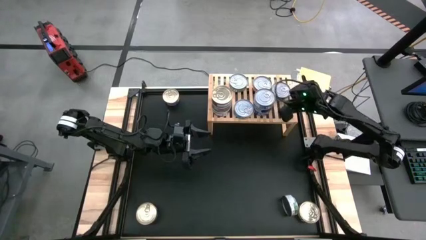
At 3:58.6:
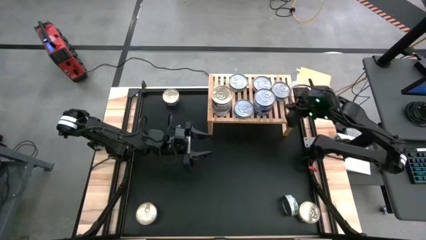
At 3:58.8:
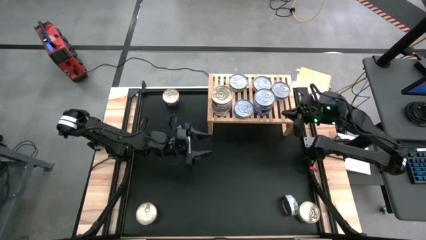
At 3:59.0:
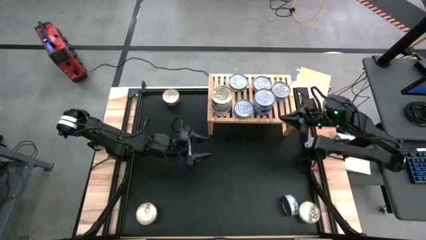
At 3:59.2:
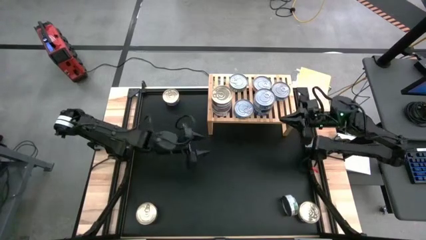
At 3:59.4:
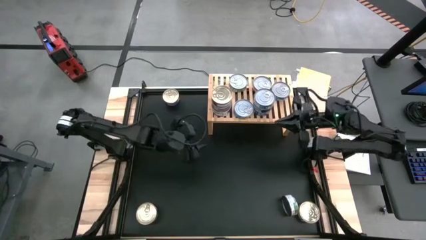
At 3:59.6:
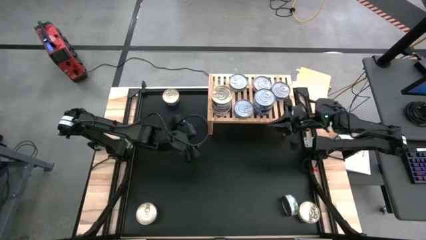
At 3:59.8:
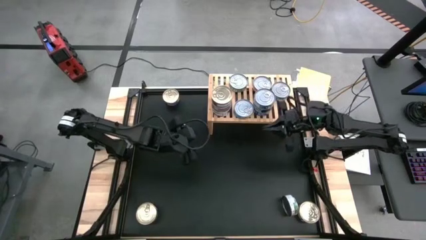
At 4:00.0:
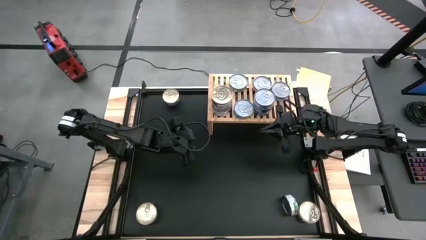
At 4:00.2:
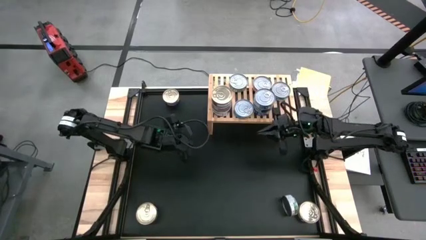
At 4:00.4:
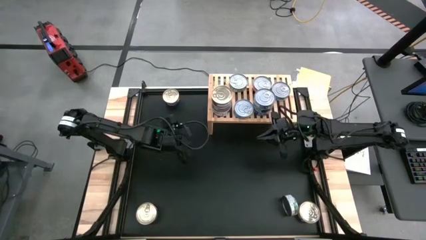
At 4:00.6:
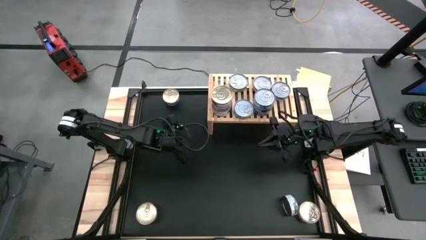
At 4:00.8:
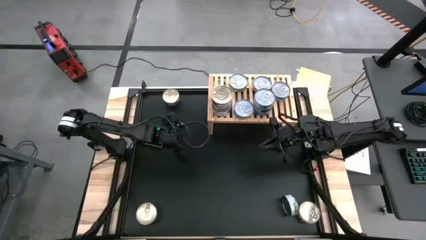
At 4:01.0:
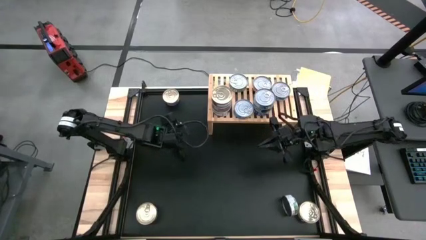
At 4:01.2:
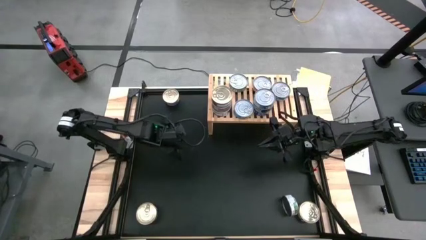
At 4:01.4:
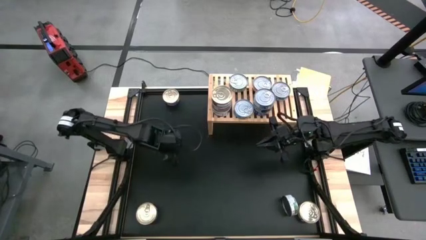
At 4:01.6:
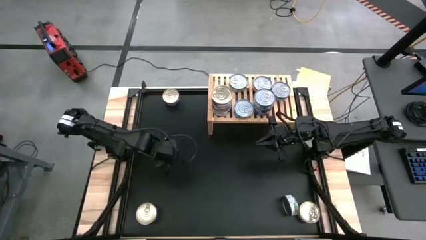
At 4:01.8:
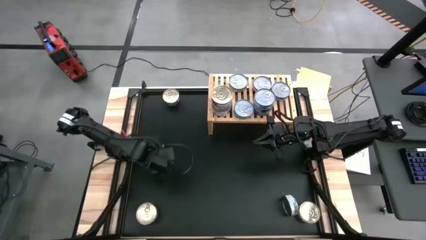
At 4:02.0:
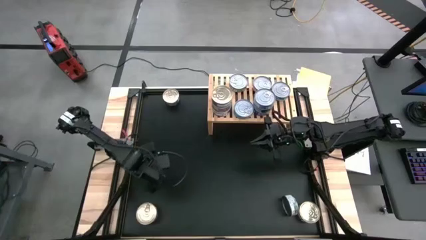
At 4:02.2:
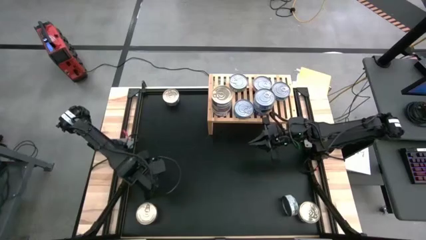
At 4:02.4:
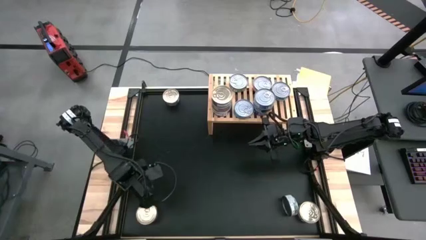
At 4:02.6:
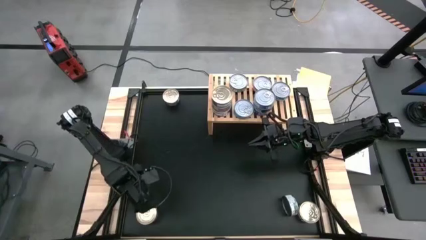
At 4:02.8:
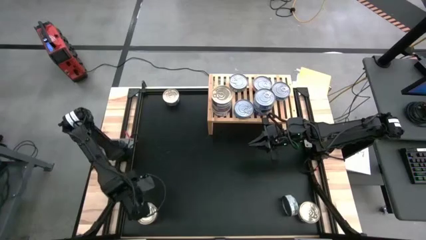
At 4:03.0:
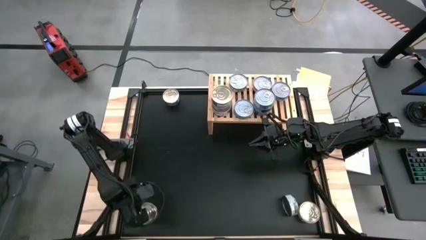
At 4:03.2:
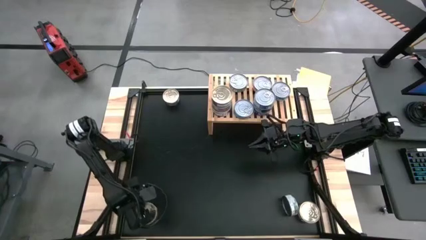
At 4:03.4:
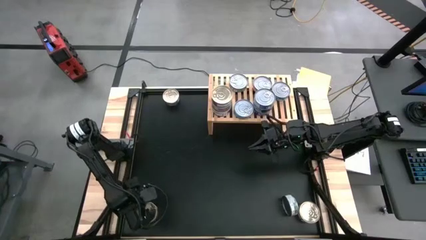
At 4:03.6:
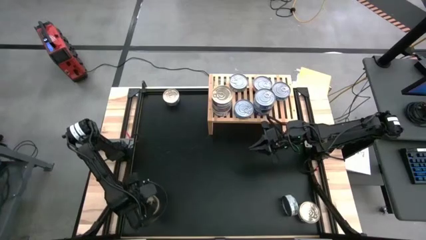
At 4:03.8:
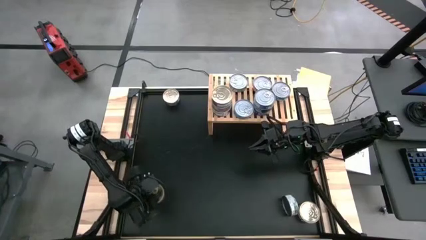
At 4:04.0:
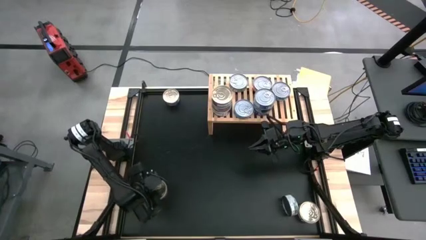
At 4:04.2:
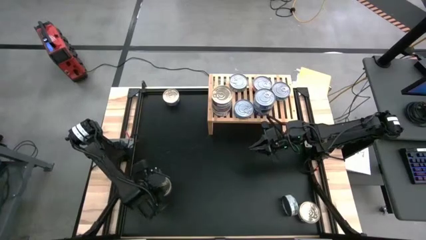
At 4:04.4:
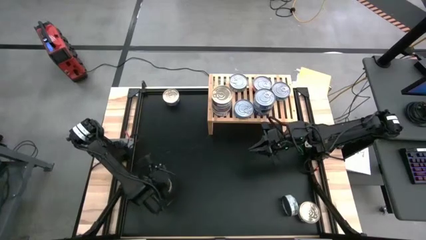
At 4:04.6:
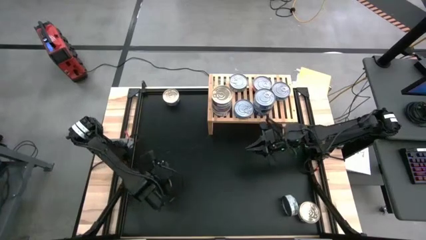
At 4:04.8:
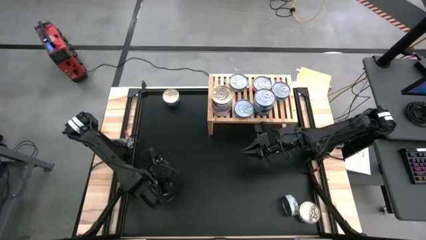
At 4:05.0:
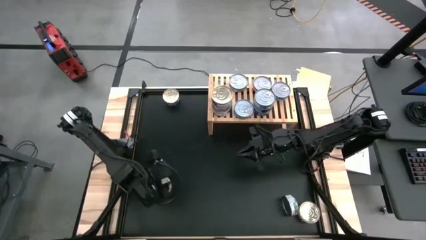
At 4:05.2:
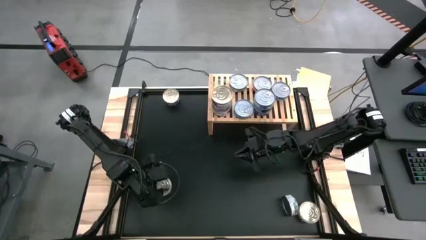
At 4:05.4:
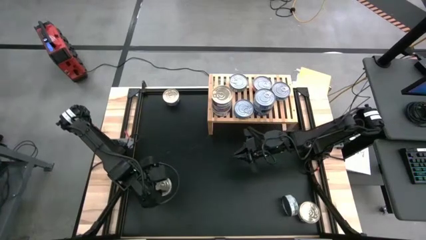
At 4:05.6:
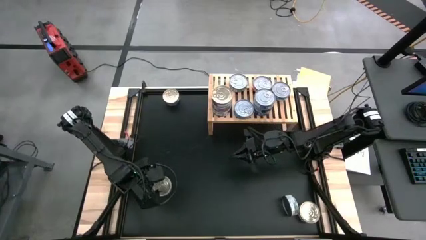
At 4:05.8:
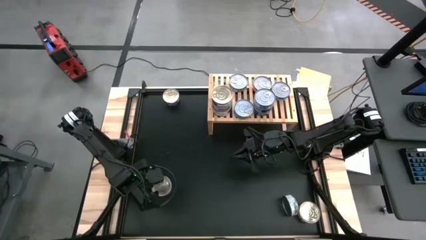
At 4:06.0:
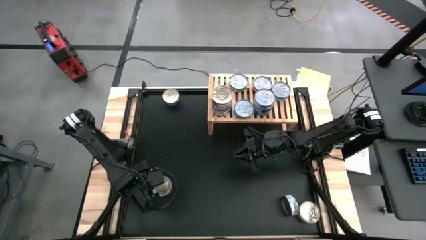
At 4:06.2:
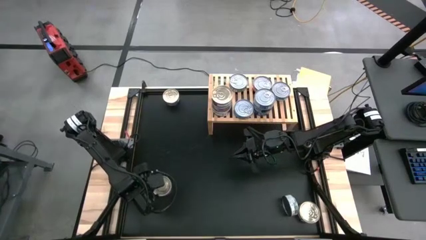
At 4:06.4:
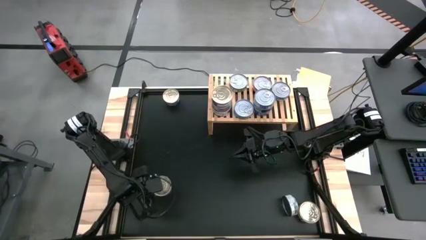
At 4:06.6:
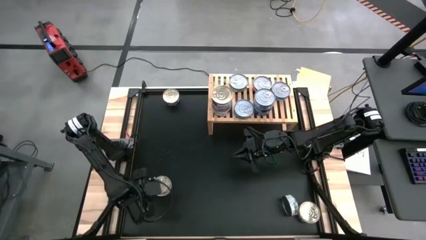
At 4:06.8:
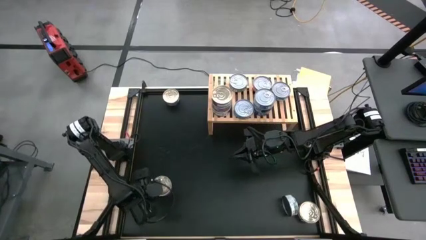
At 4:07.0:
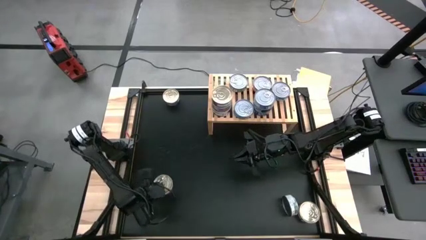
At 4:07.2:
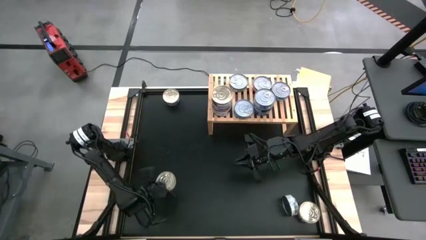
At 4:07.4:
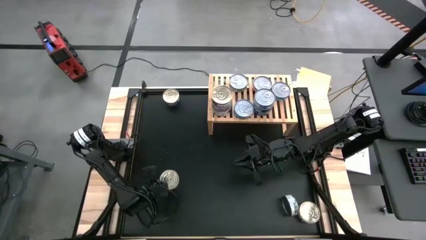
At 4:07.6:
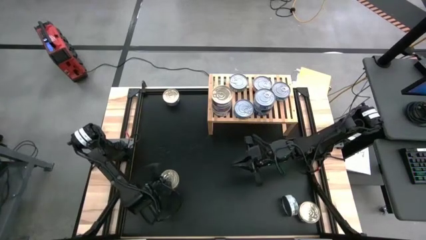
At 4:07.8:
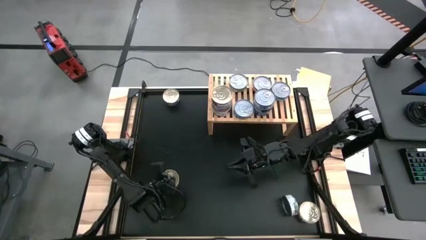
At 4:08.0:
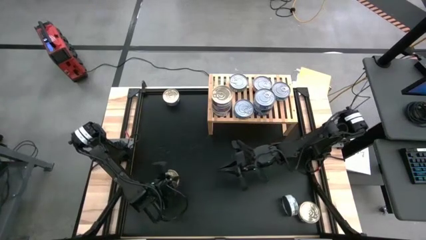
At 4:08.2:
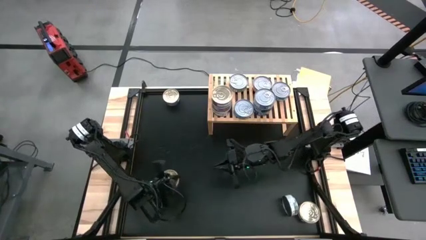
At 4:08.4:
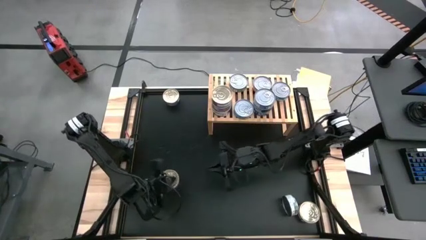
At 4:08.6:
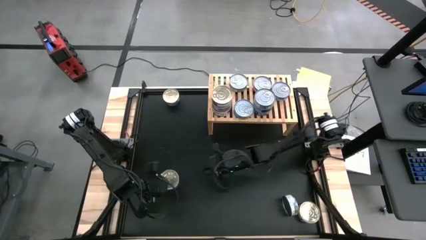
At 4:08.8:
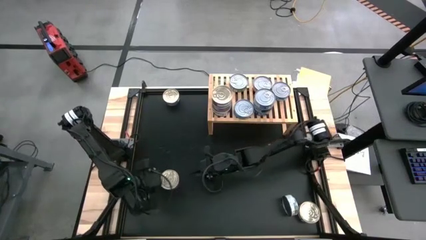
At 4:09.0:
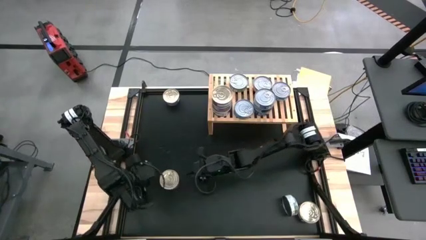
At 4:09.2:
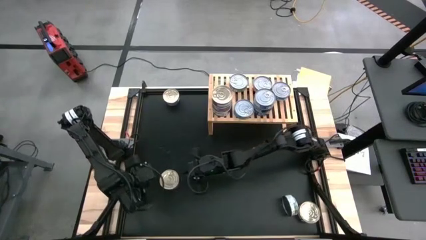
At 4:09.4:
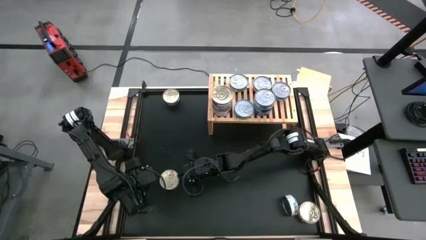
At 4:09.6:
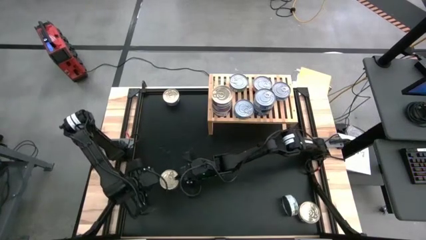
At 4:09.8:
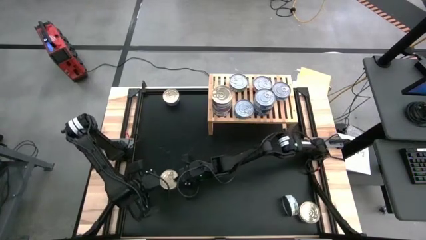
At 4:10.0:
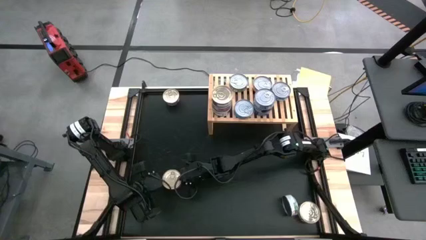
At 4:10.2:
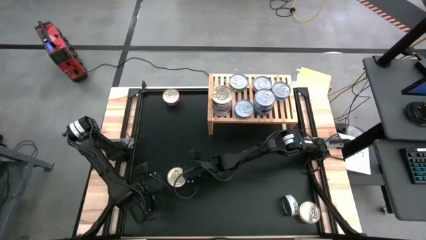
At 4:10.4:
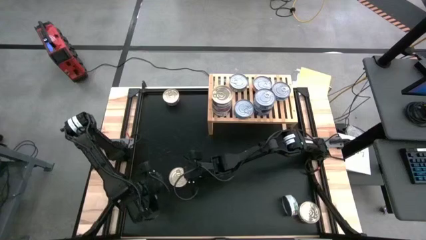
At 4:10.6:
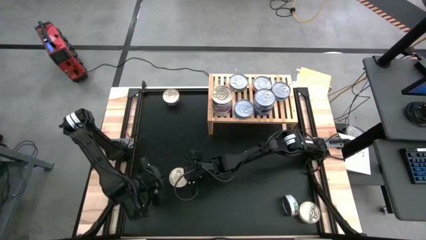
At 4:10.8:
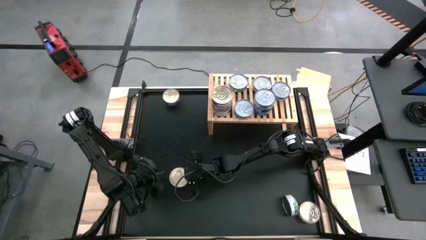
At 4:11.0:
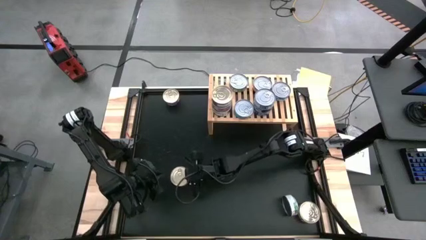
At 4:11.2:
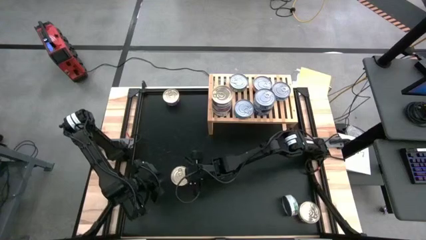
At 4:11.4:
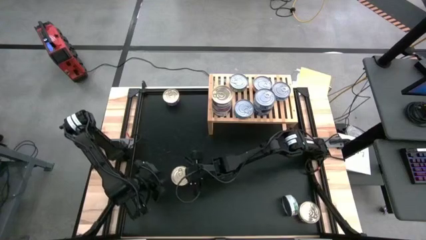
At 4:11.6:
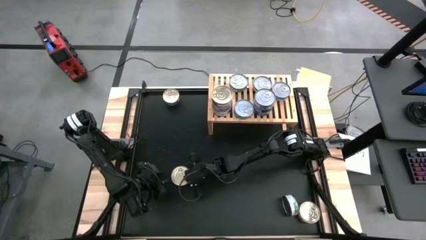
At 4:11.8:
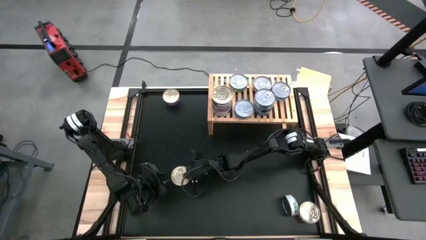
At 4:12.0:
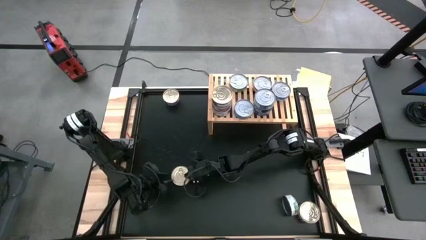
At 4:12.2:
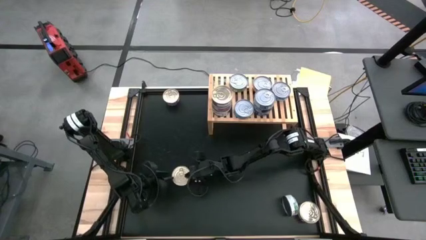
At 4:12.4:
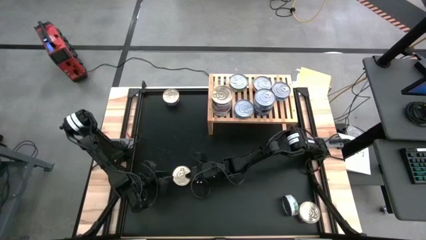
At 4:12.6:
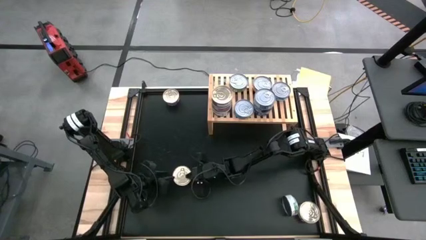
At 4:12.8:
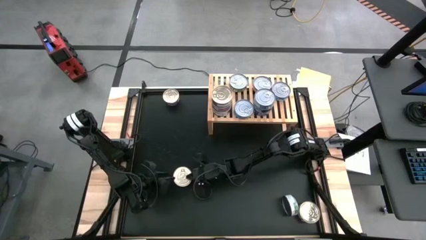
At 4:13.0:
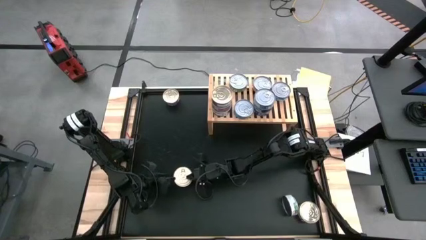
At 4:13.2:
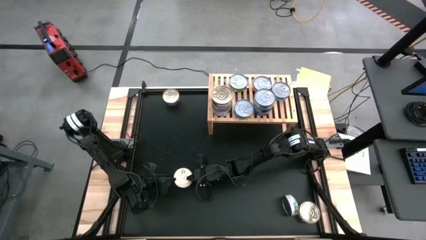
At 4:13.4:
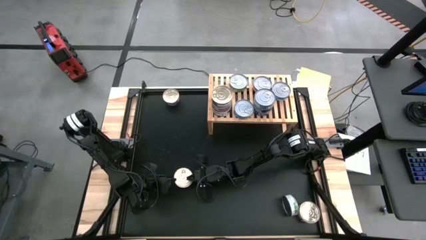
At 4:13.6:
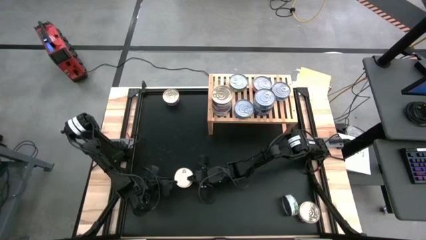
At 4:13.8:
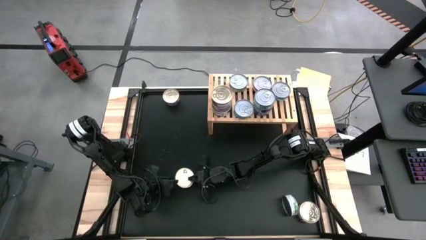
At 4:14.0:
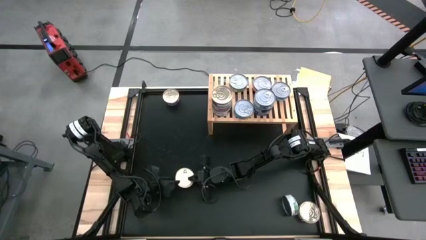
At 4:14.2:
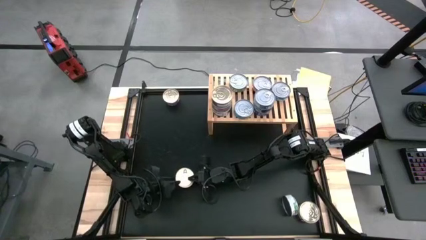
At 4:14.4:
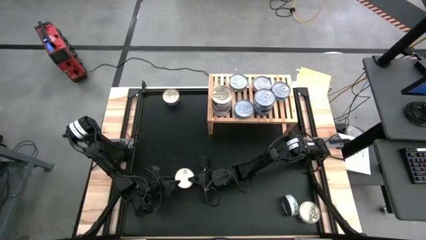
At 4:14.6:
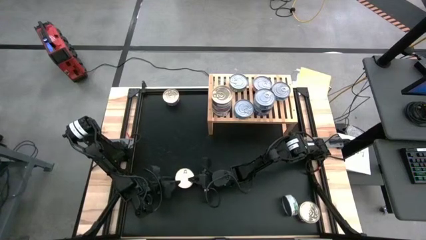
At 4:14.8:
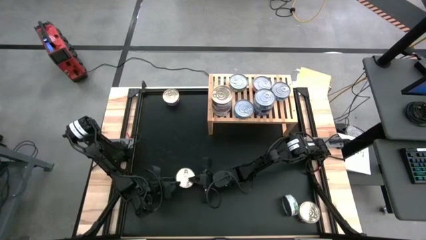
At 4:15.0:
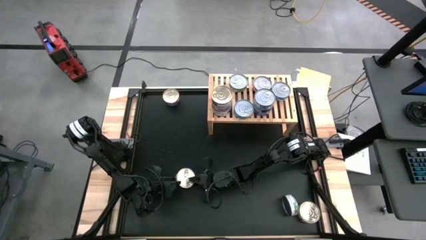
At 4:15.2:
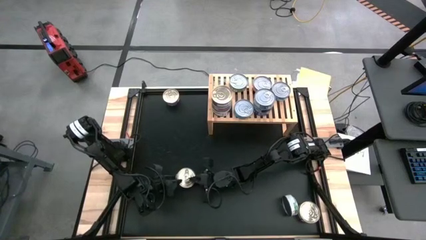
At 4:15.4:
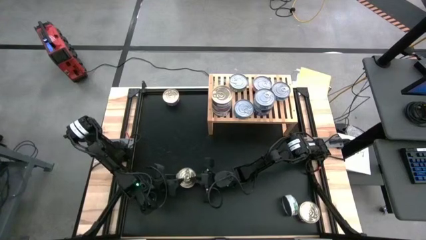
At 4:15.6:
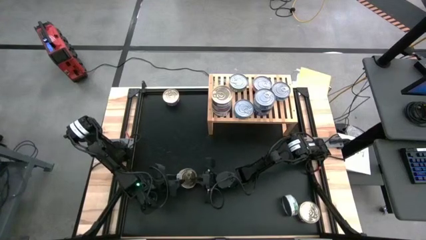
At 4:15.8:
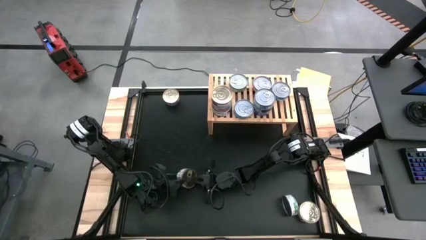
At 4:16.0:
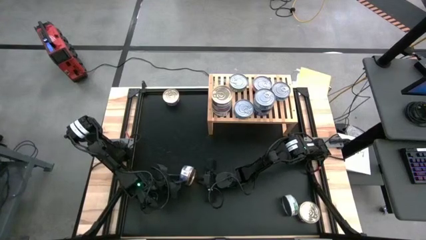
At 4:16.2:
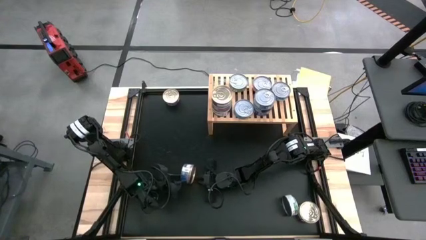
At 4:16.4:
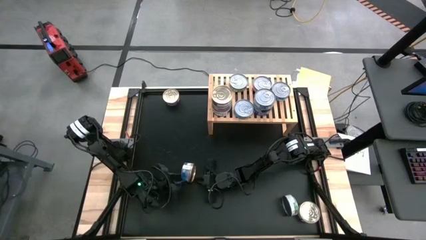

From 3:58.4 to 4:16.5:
Task: Stack canned seafood by type on shelf
Put the blue-pink tuna can on the shelf
